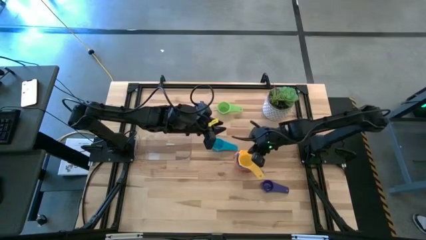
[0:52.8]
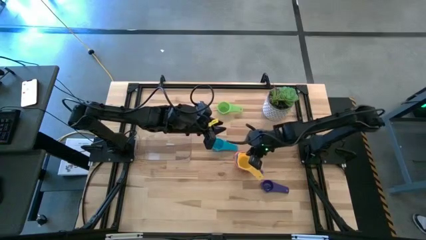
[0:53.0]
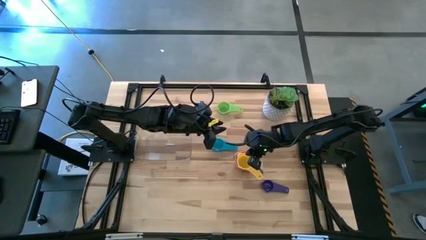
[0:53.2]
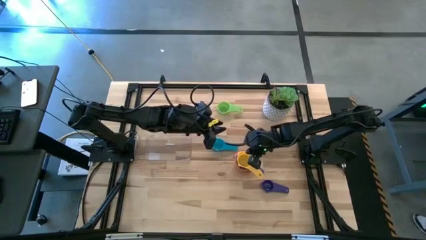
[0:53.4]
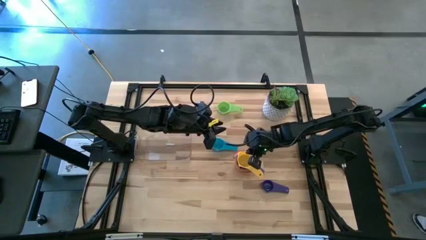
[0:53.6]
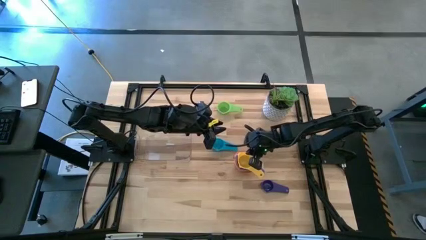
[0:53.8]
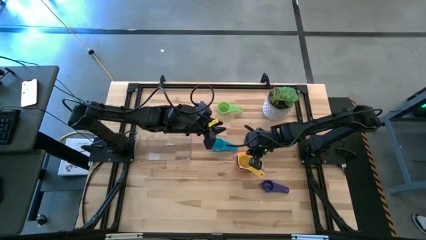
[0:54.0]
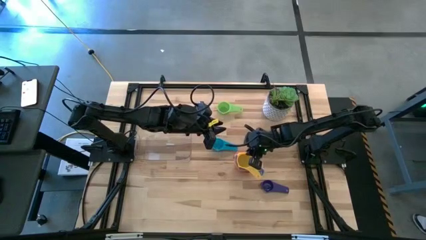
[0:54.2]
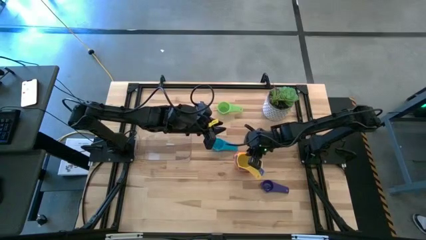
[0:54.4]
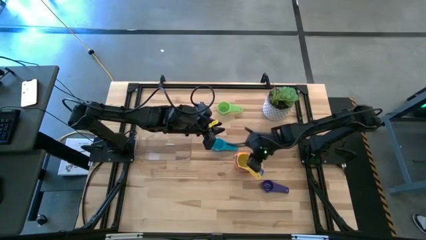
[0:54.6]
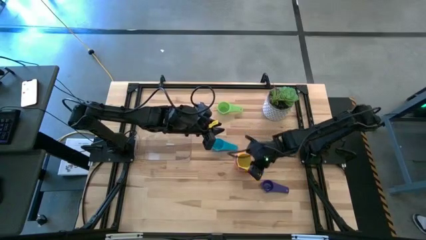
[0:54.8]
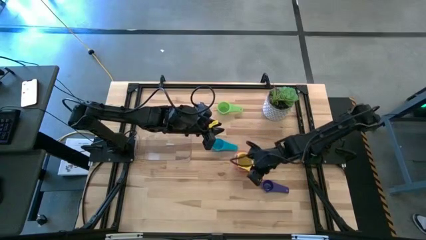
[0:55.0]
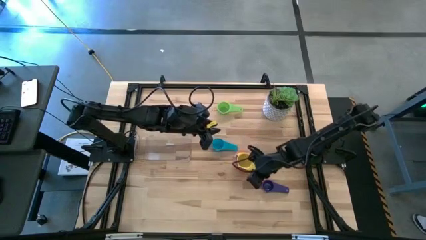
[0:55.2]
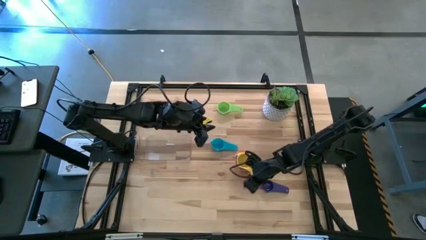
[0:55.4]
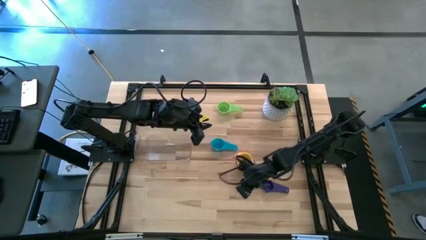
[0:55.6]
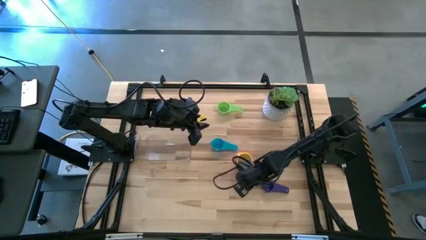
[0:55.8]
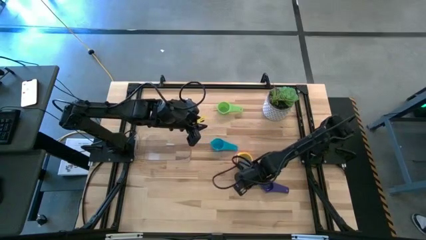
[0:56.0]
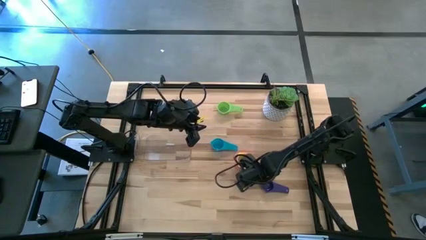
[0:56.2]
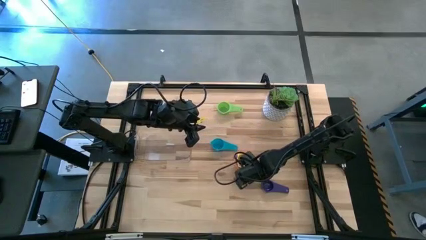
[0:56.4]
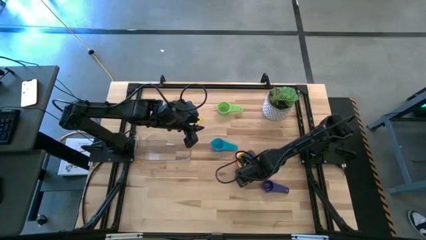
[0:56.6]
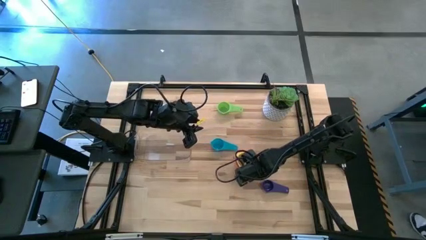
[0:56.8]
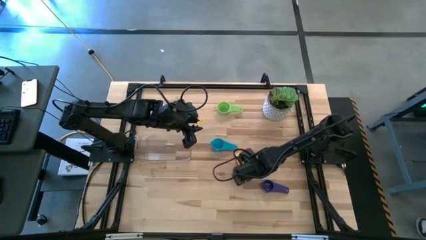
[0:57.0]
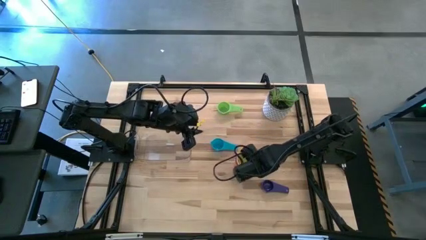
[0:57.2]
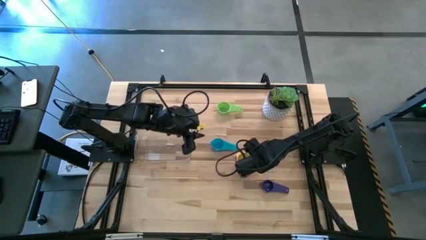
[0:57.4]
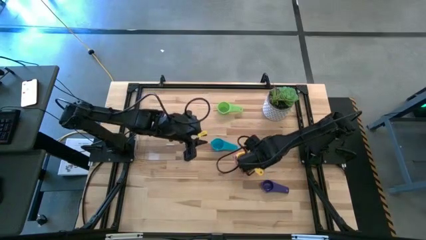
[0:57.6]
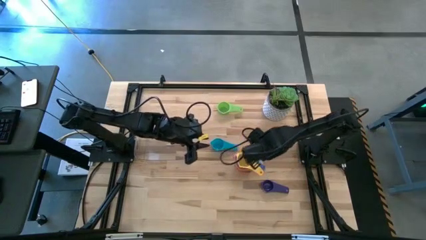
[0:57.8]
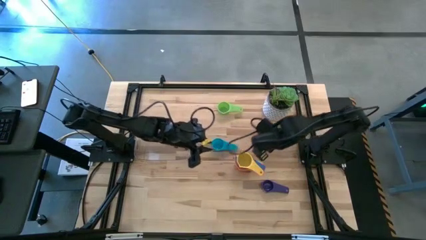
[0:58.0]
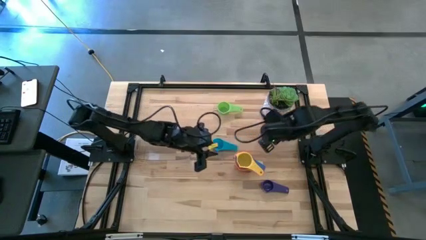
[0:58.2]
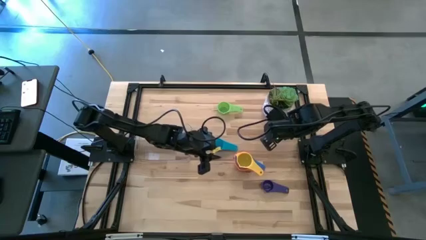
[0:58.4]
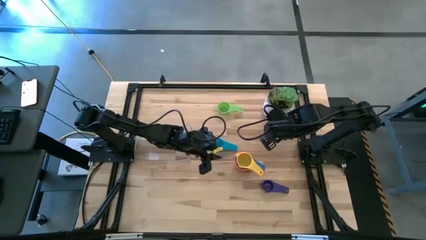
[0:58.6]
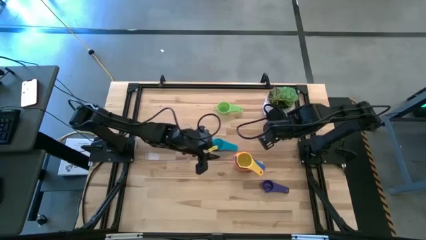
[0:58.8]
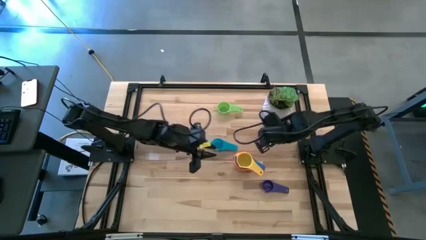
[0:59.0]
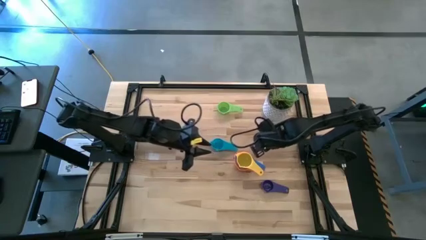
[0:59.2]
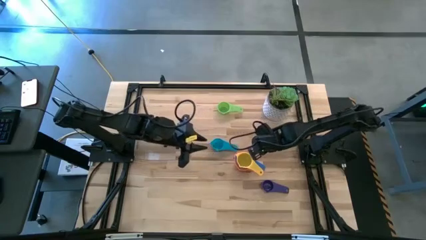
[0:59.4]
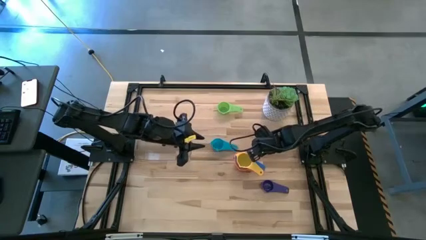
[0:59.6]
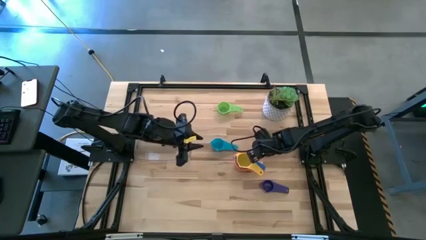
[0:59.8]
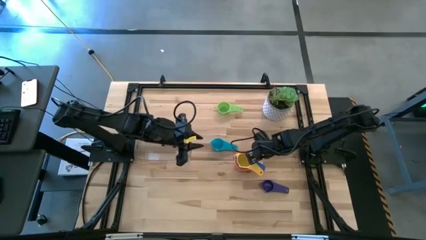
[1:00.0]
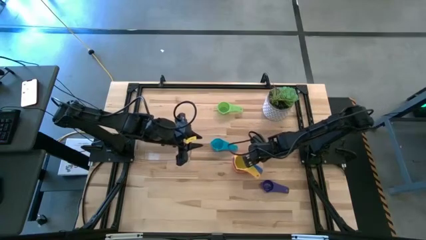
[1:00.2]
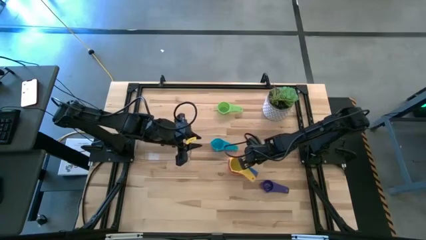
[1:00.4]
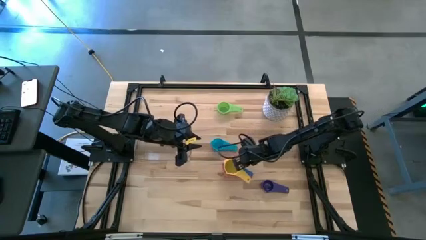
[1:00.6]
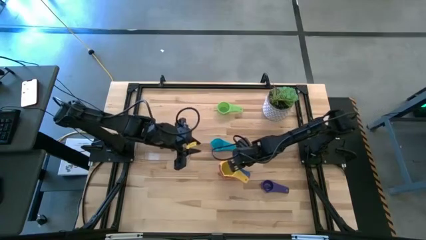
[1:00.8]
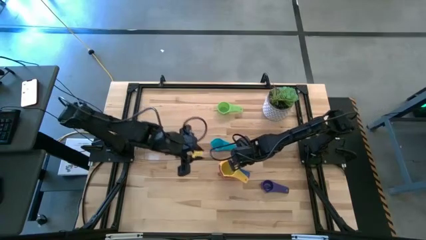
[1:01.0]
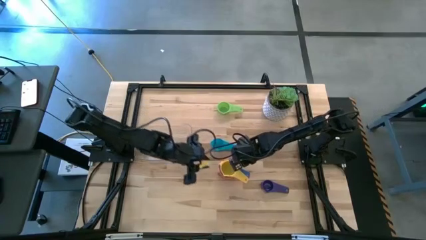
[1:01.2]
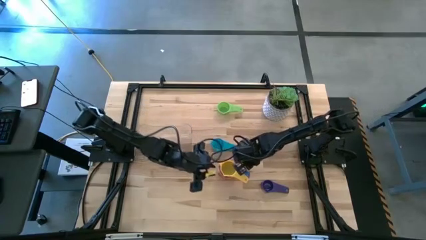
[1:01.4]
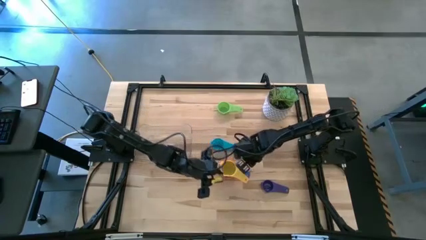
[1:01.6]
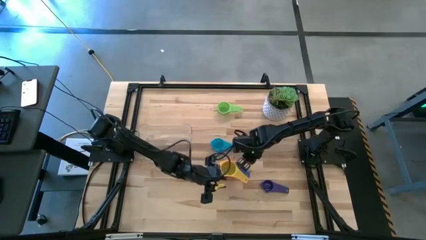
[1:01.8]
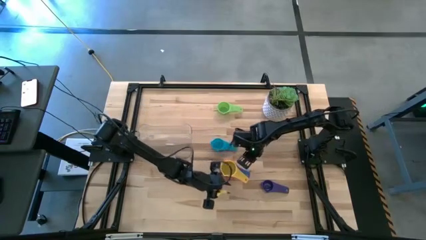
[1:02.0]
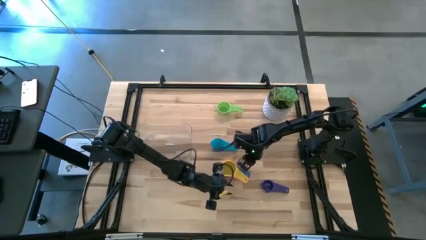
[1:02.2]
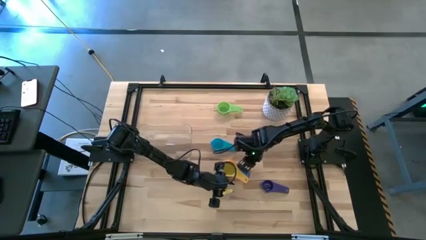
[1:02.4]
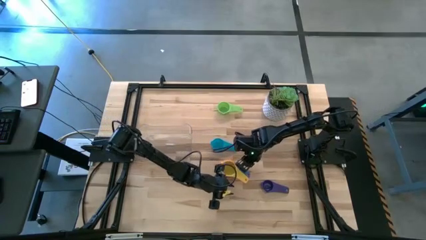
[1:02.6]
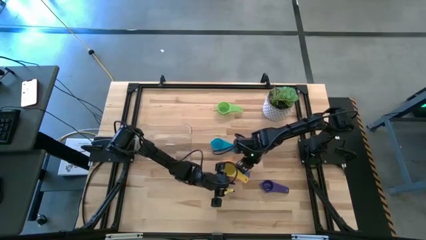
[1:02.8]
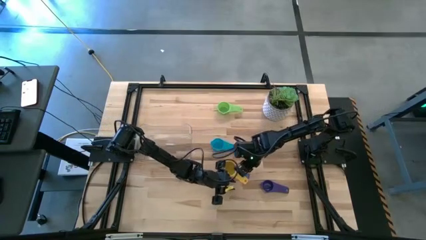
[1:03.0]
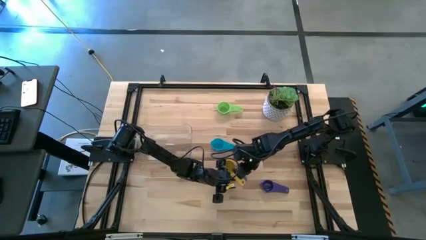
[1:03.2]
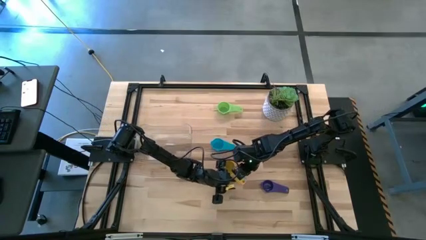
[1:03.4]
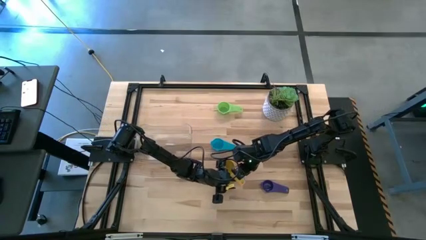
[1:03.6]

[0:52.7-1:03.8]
Task: Nest measuring cups in basket
Stack the yellow measuring cup into the blue stacked measuring cups

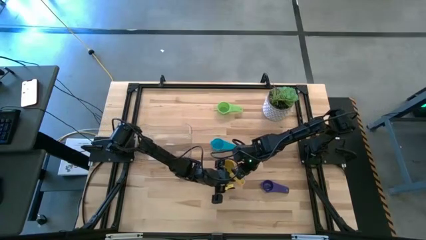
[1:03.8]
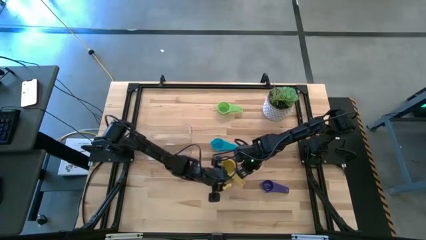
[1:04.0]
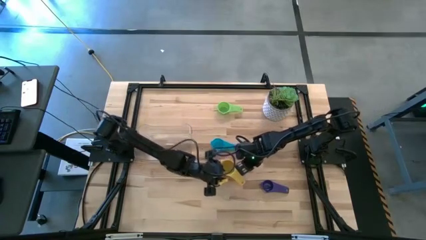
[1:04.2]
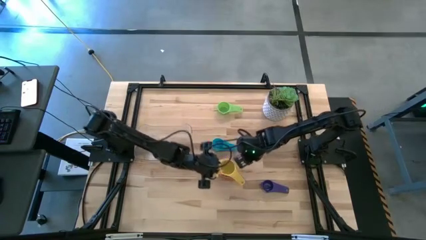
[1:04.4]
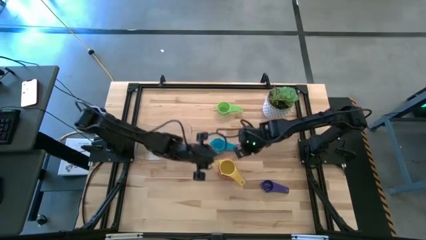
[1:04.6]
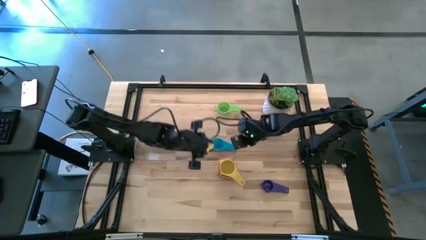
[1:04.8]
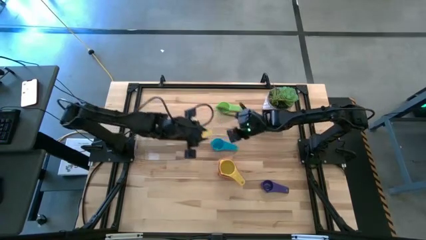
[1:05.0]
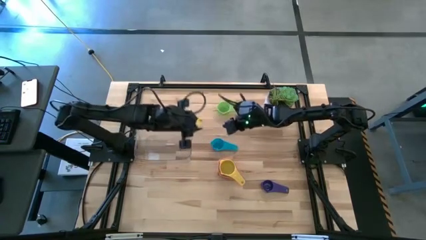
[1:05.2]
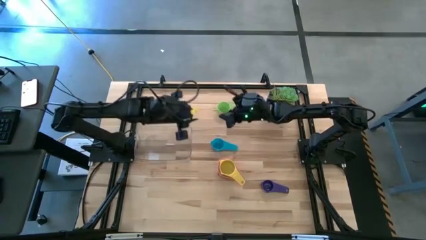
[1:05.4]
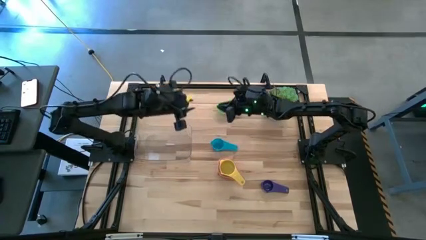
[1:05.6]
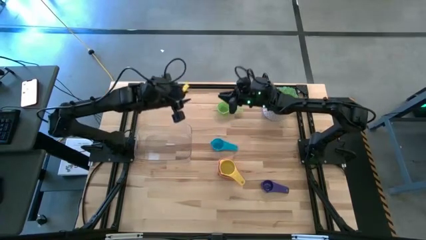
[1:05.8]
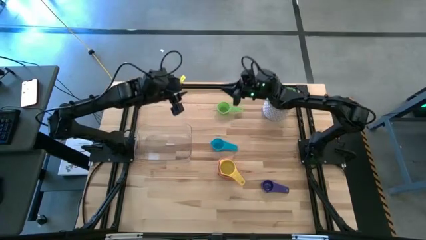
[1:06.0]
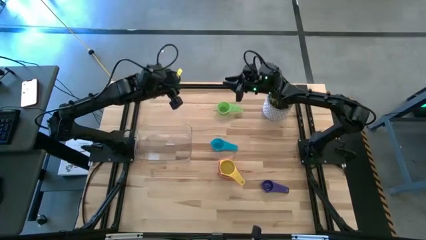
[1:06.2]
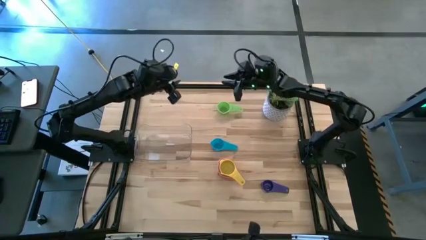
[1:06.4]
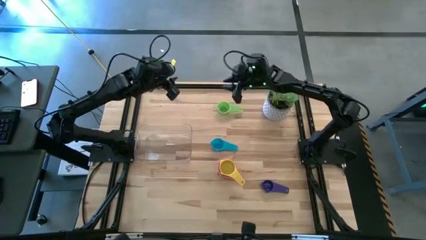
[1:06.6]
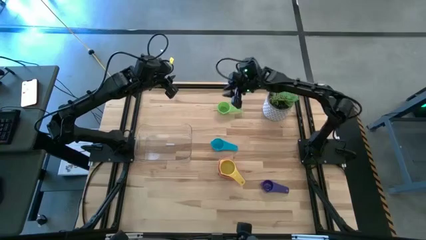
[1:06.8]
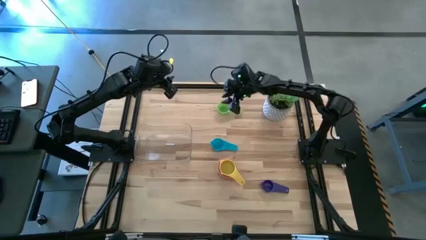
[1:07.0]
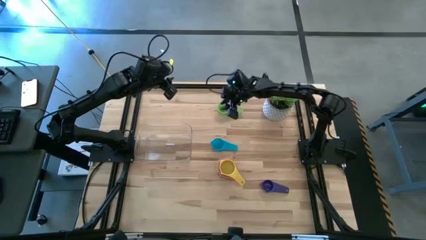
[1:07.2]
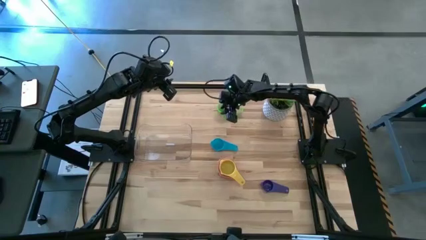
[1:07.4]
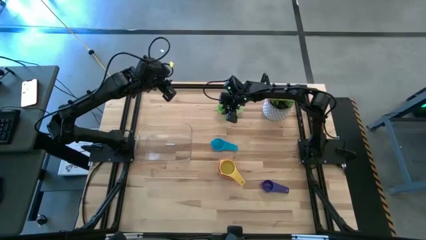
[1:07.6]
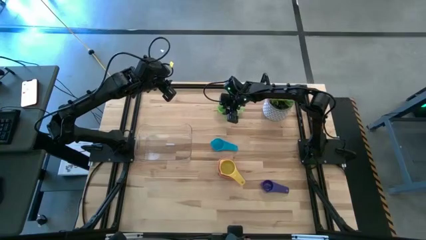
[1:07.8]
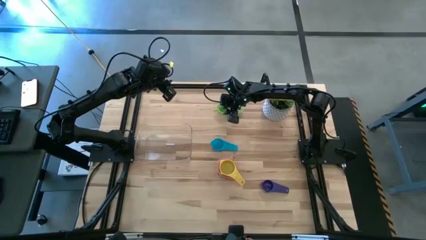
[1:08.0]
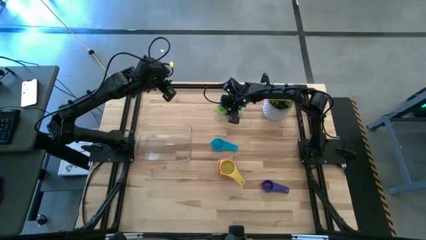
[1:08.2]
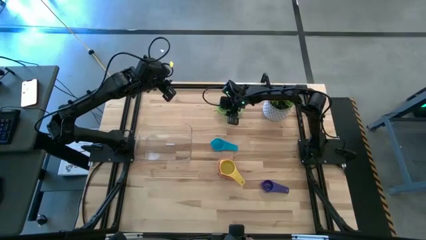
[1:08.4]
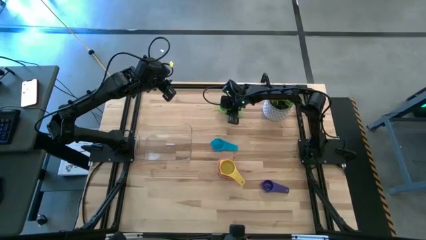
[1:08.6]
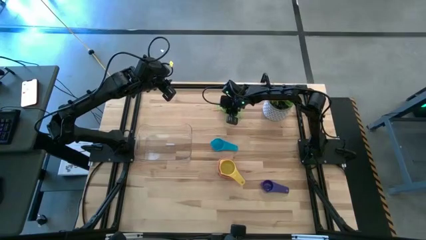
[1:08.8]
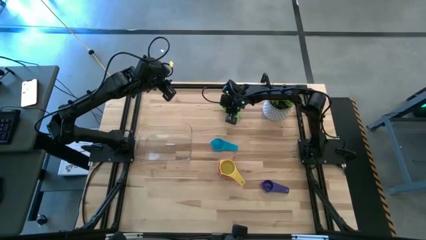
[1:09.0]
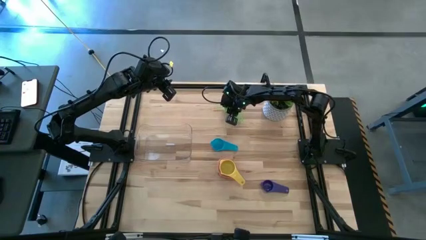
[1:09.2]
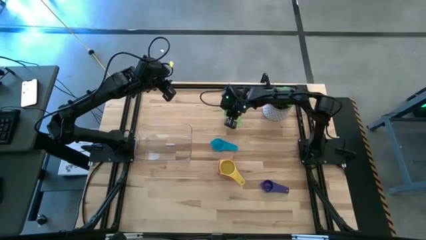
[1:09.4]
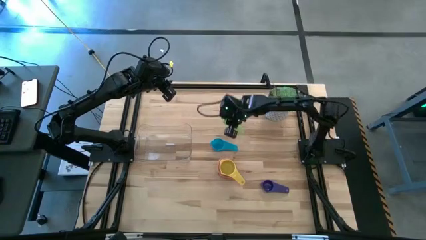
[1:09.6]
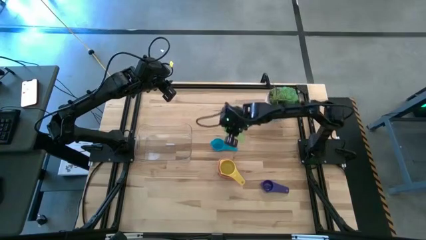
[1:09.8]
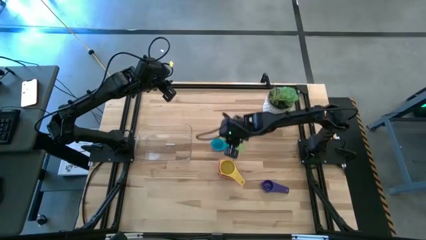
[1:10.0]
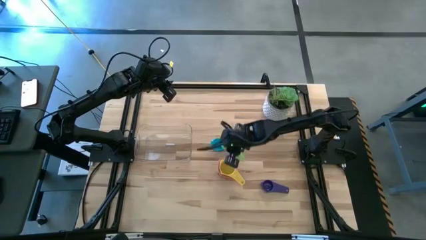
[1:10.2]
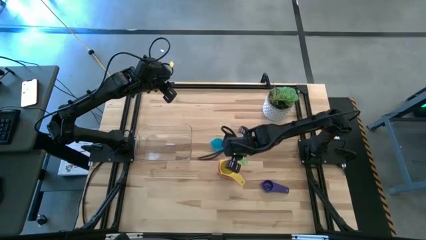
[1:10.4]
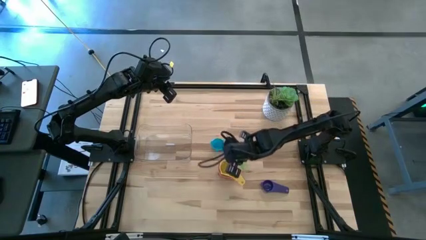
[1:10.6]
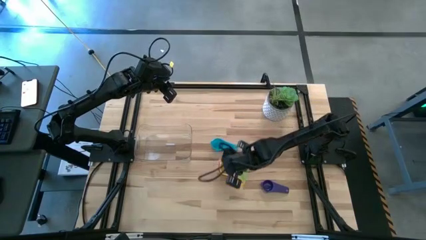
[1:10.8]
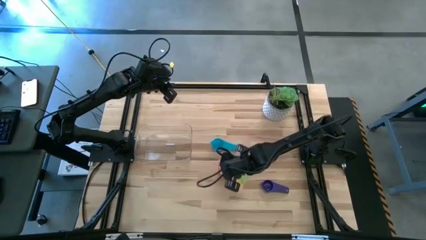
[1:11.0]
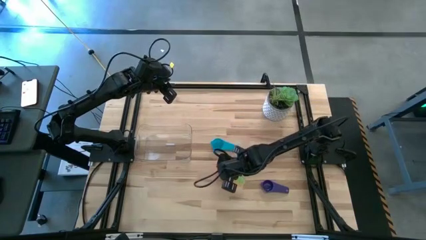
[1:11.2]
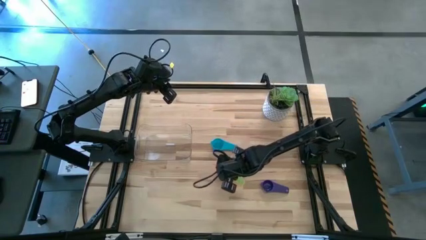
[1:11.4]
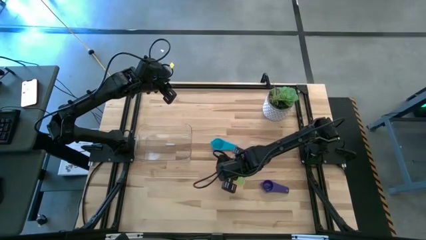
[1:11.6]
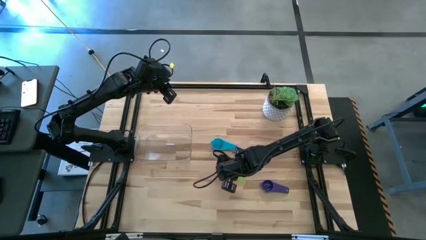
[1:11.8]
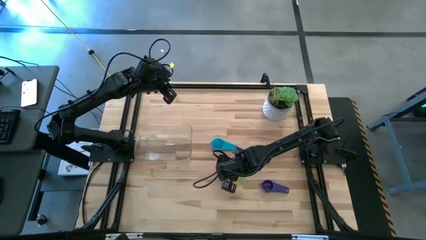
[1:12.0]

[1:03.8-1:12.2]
Stack the green measuring cup into the yellow stacked measuring cups
